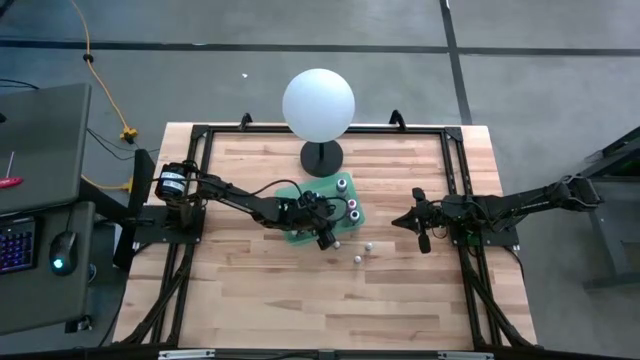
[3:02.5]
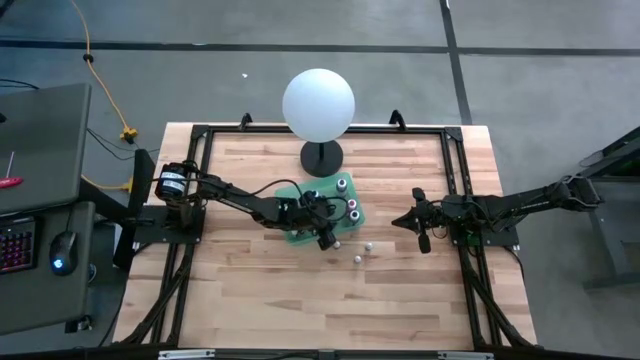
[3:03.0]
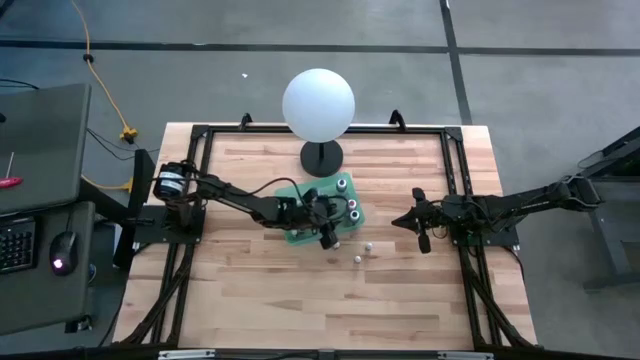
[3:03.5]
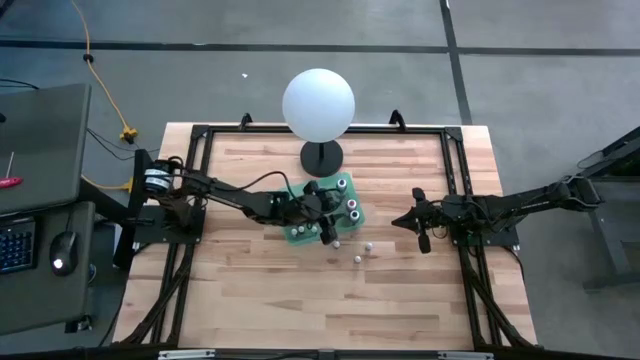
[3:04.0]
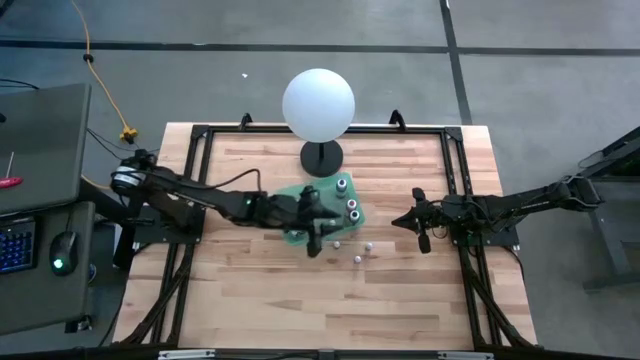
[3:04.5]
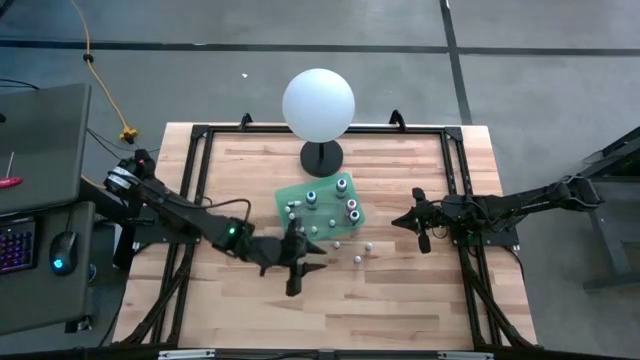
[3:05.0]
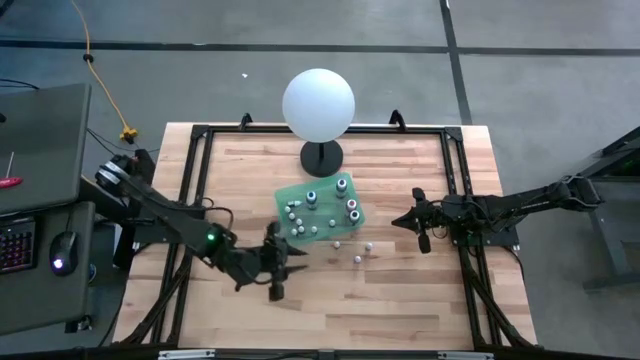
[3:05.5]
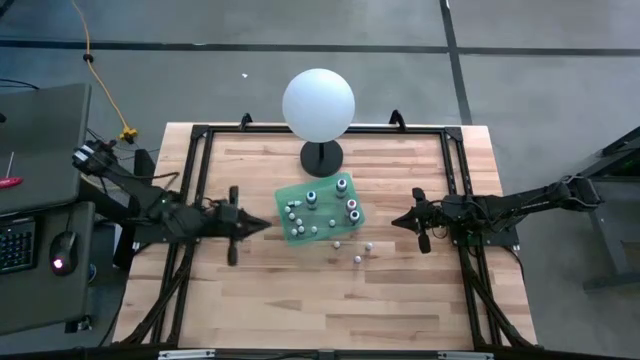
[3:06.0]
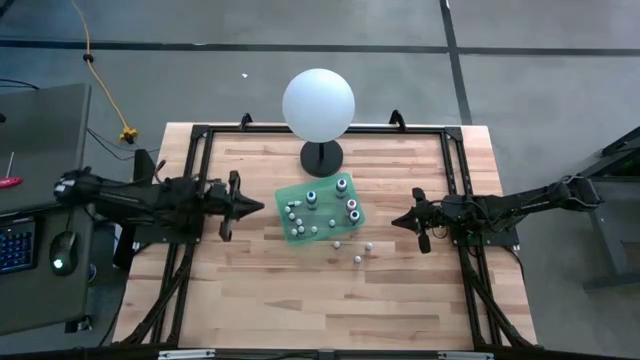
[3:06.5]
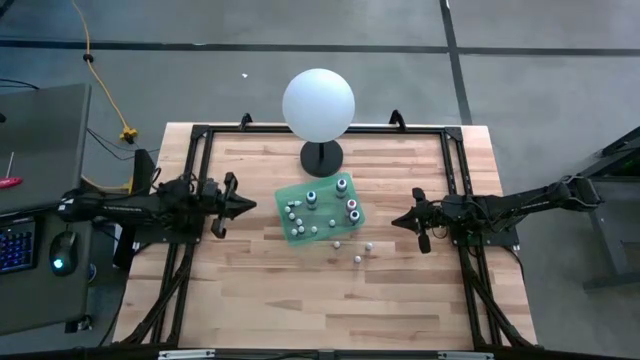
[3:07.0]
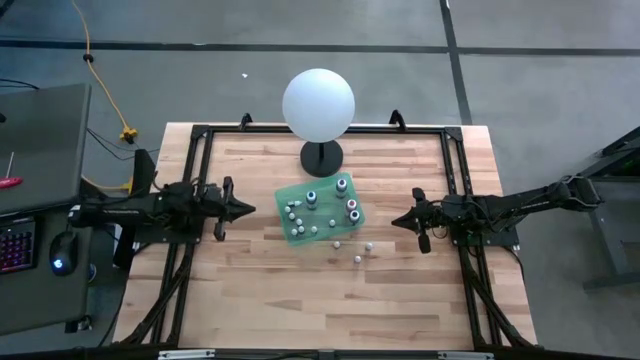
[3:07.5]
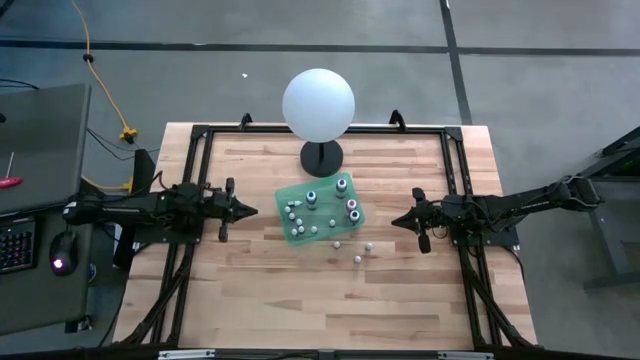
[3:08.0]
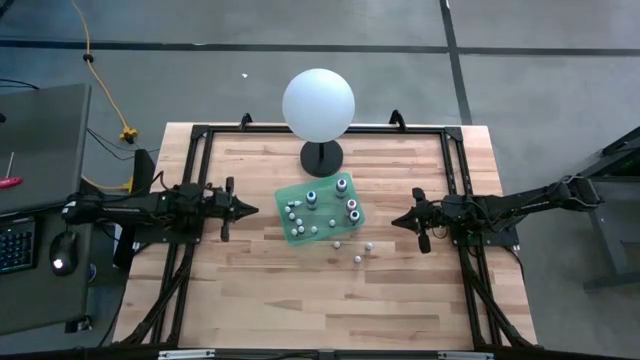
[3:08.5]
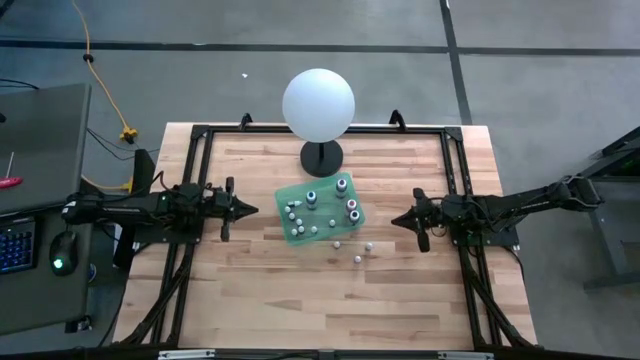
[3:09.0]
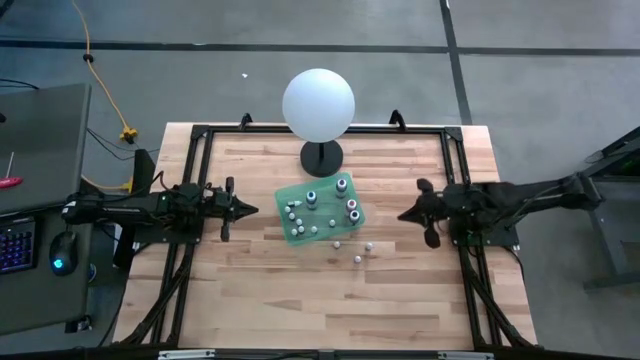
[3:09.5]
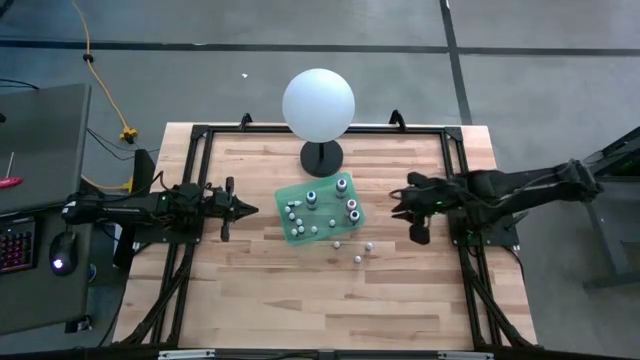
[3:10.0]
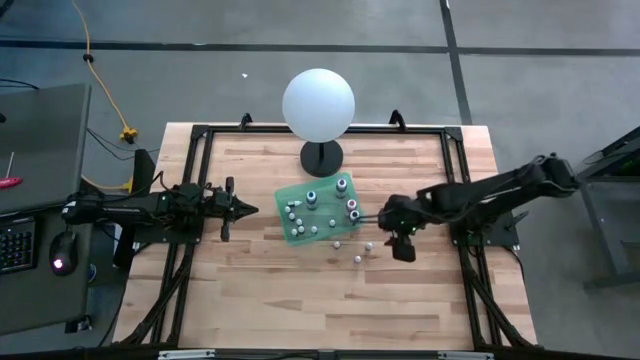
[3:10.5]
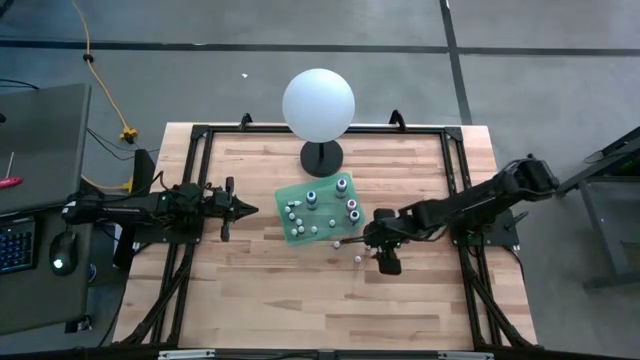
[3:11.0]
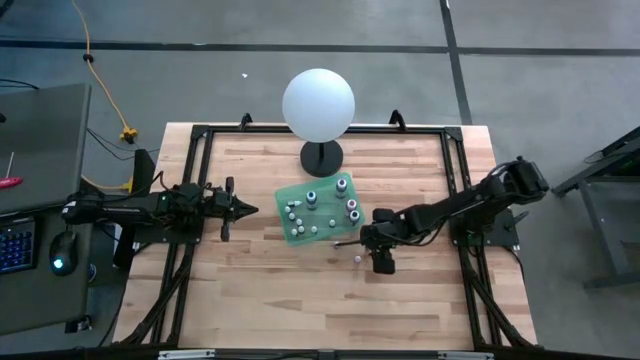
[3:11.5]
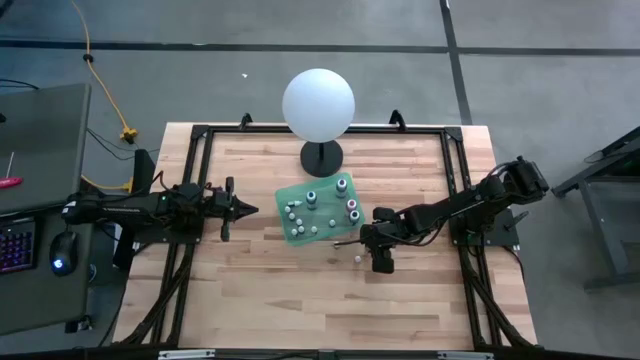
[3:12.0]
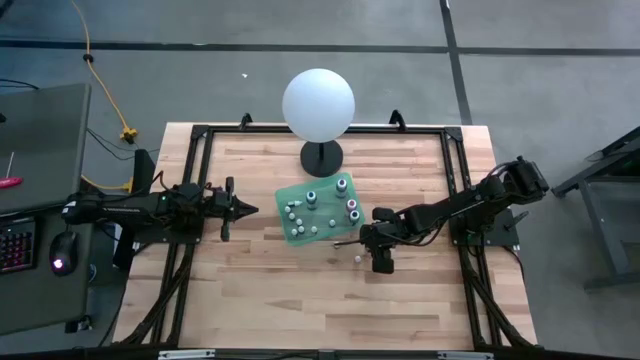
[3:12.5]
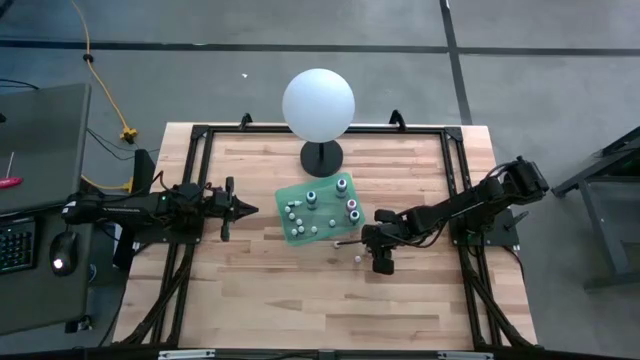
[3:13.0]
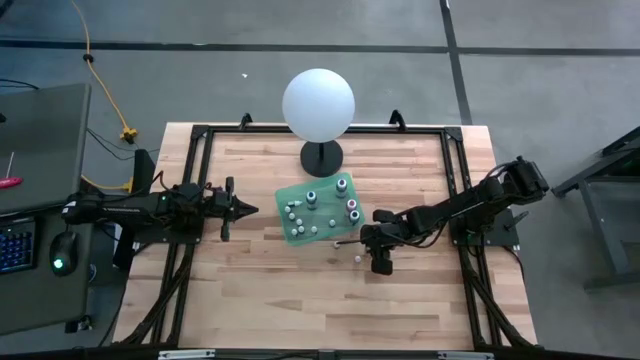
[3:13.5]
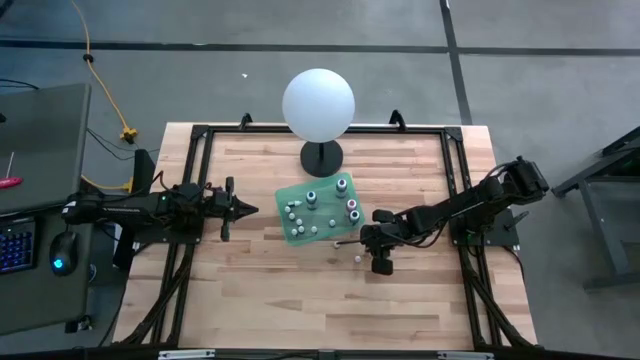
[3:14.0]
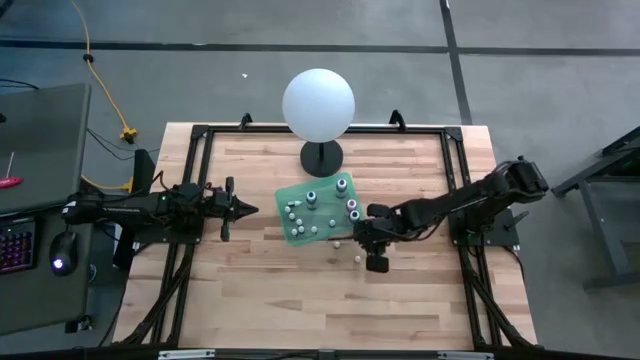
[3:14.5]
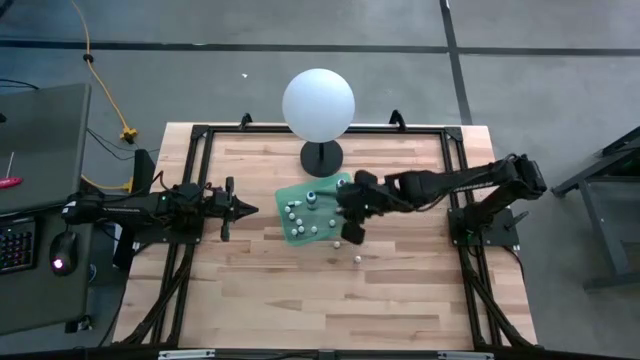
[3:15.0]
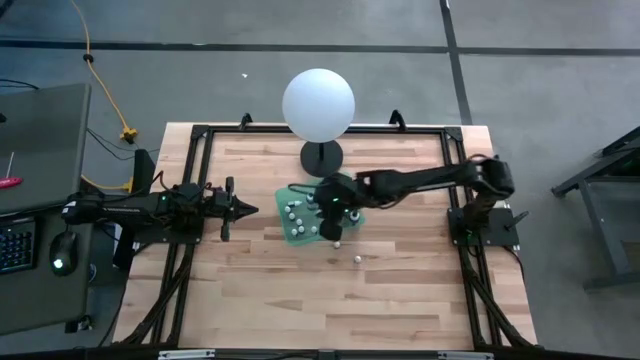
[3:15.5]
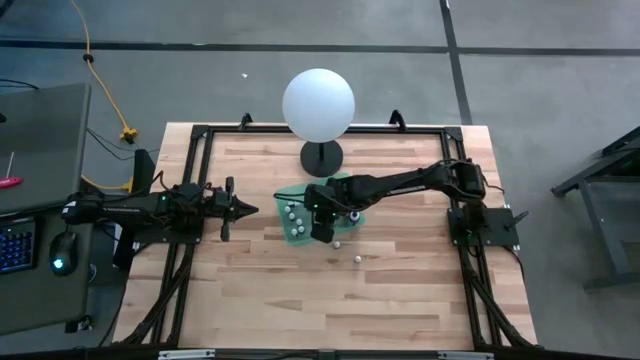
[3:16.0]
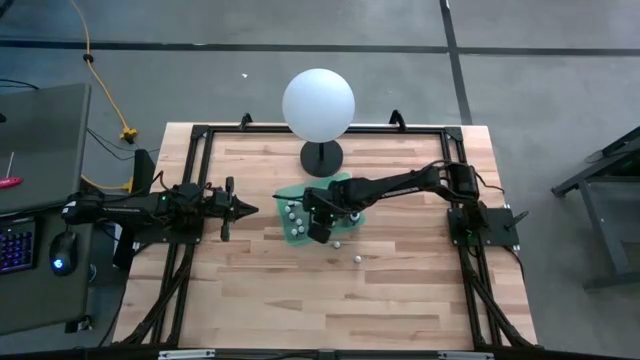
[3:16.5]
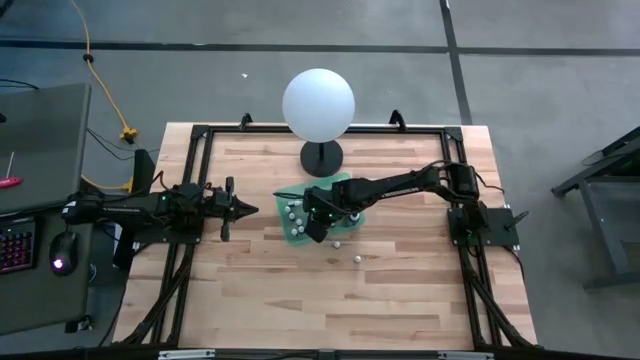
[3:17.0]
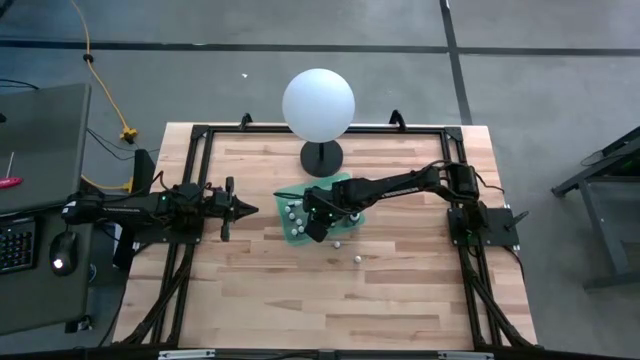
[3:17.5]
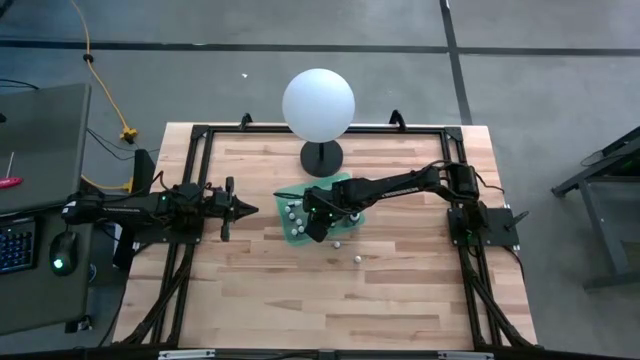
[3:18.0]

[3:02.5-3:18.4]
Task: Pick & Place food coloring
Put the small blue food coloring bottle into the bin

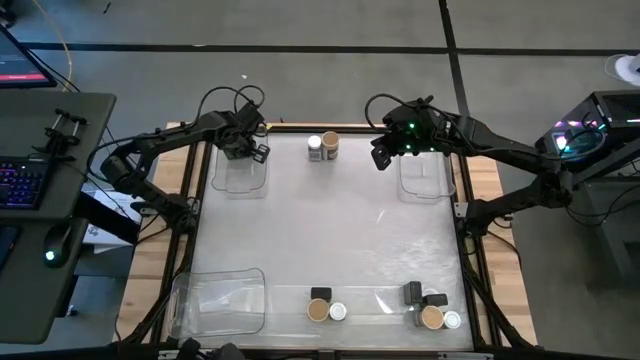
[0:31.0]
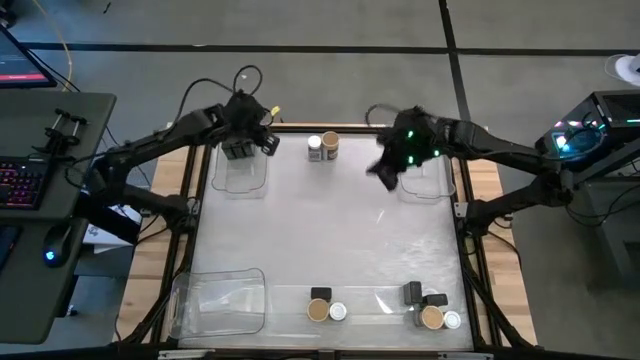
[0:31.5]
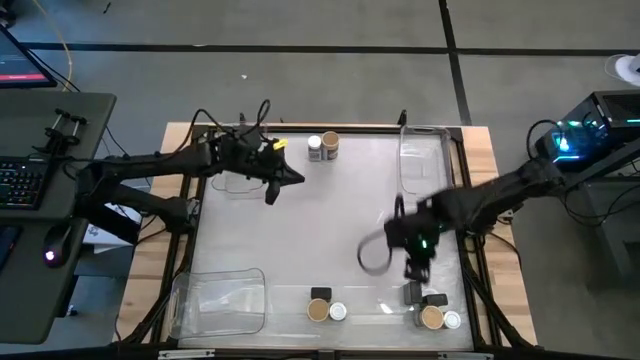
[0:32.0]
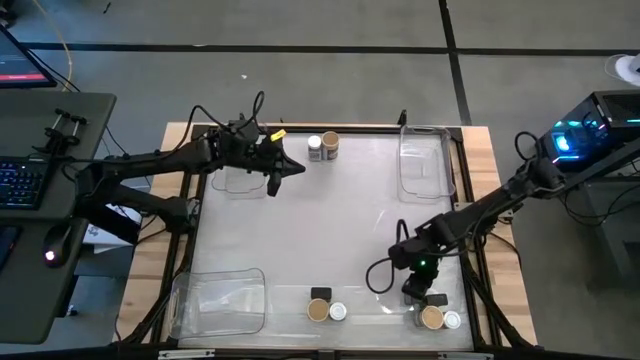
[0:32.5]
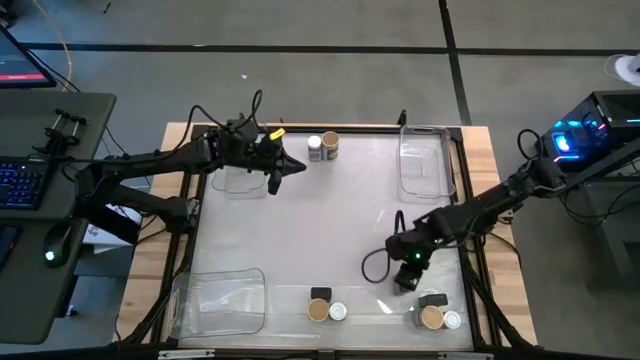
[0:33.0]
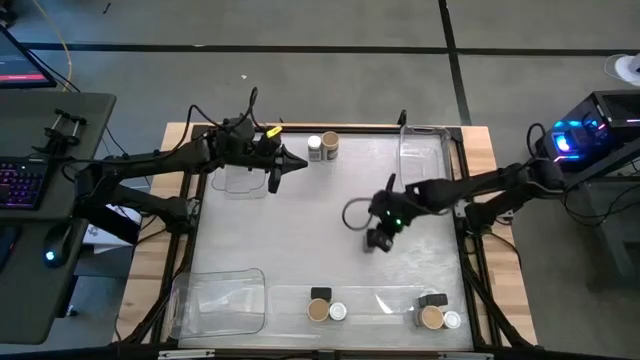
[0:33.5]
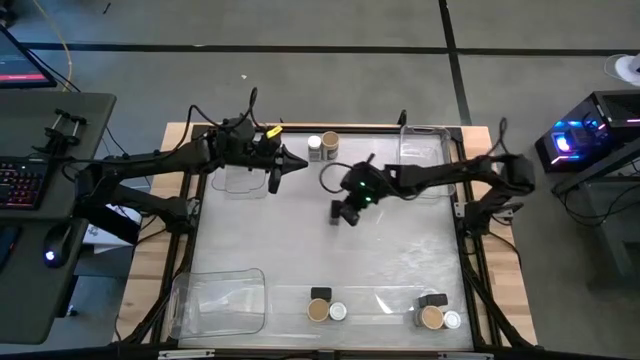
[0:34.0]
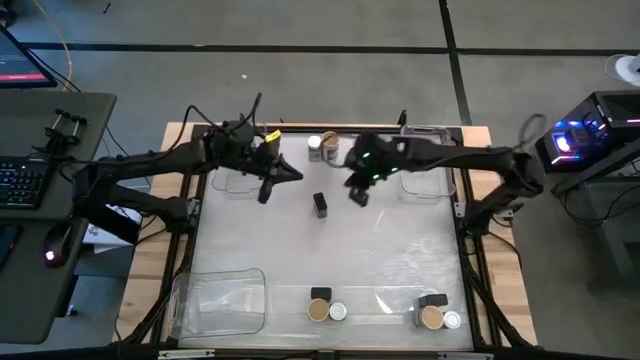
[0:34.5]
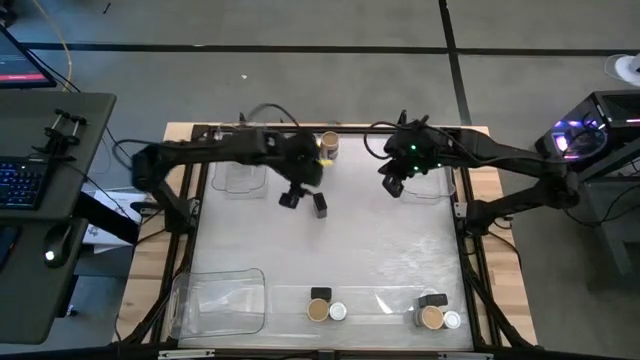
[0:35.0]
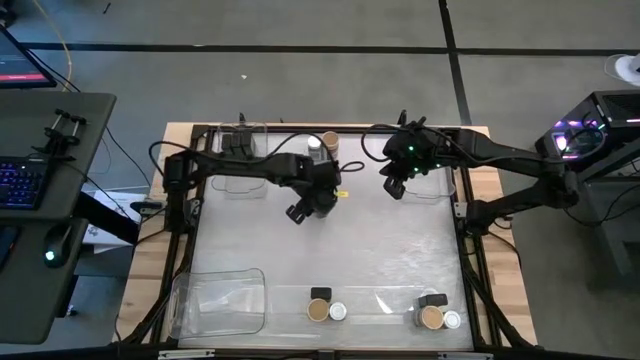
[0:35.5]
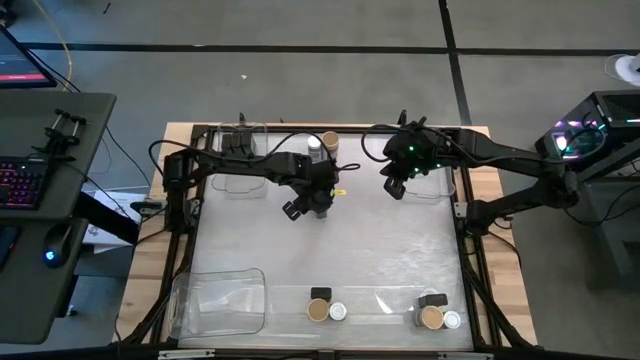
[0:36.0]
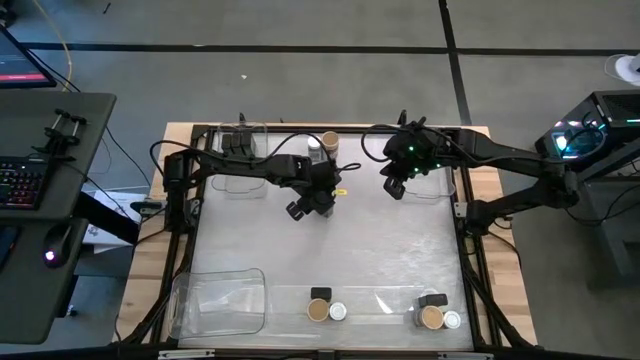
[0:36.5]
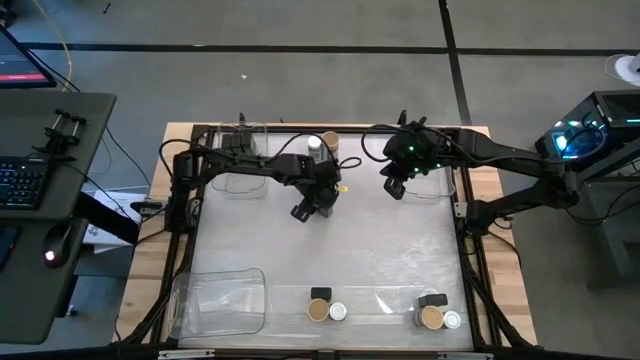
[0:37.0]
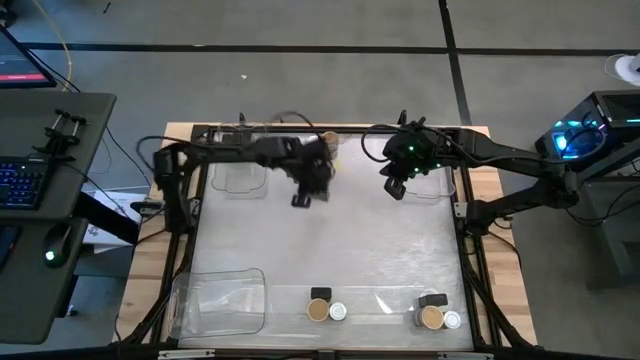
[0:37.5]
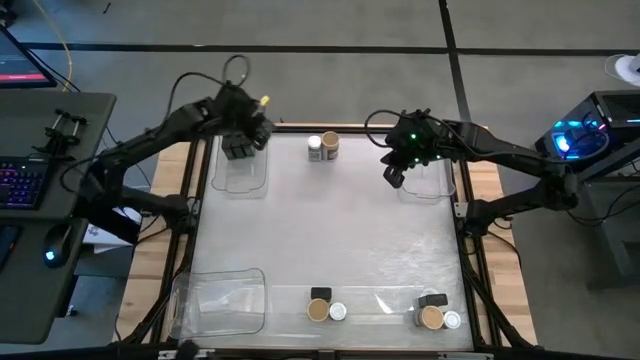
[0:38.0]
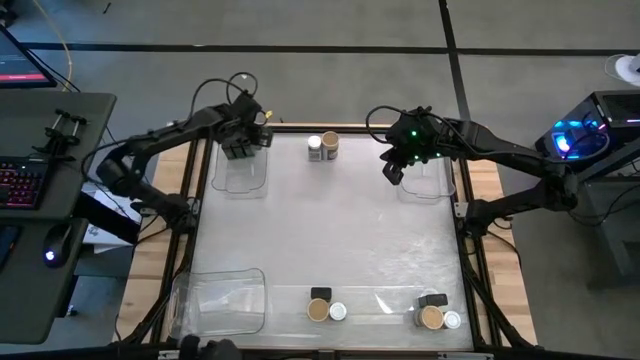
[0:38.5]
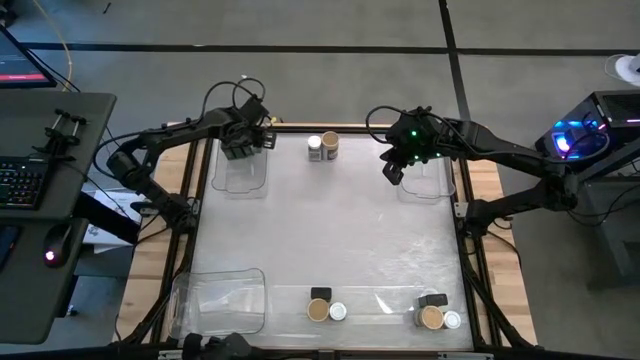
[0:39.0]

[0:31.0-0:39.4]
Task: Sort spices by type
Put the black seasoning can into the top left transparent bin
